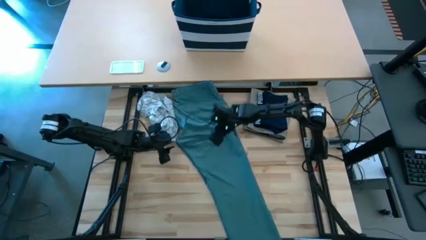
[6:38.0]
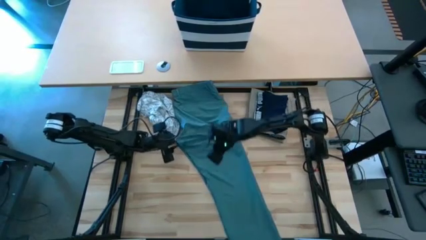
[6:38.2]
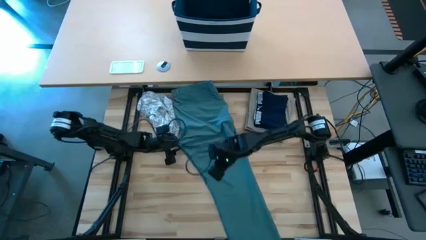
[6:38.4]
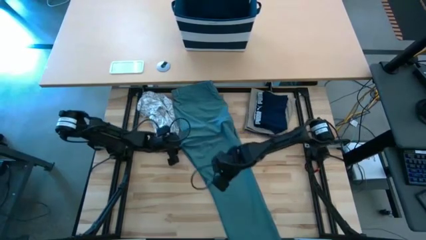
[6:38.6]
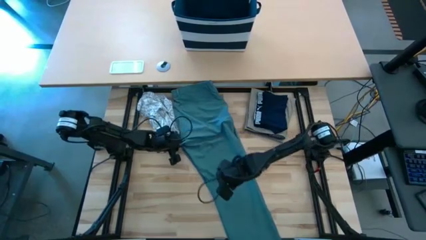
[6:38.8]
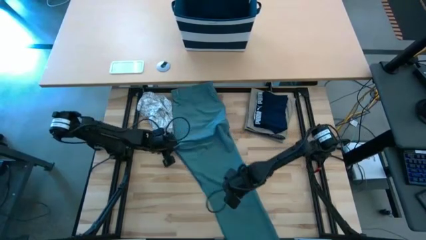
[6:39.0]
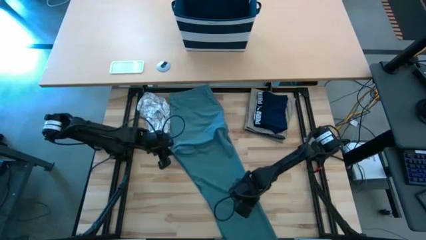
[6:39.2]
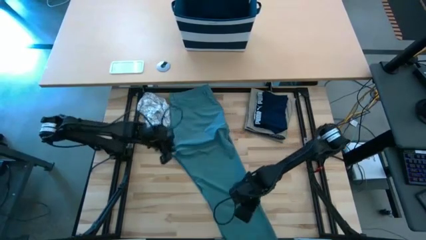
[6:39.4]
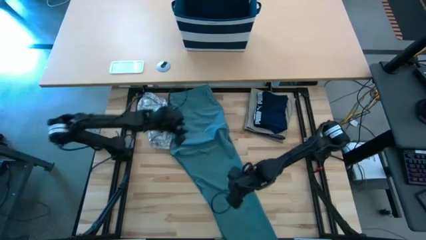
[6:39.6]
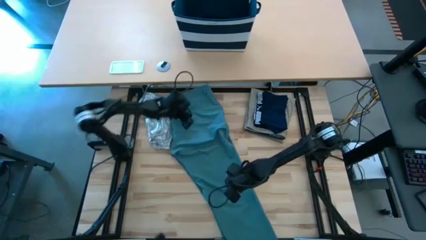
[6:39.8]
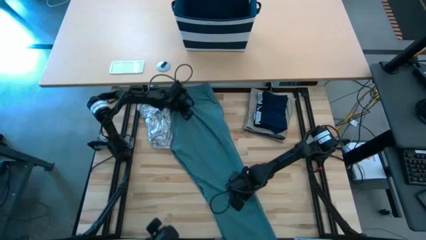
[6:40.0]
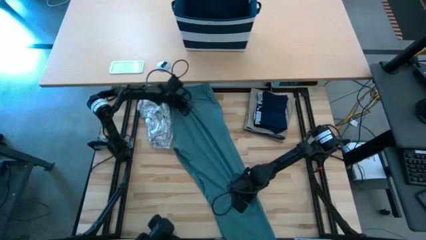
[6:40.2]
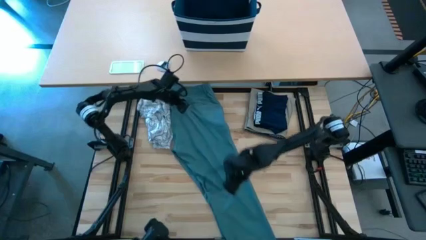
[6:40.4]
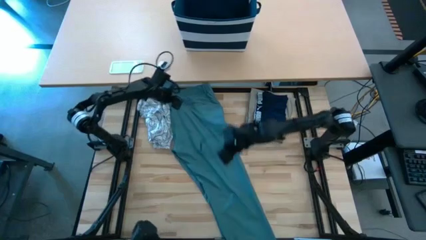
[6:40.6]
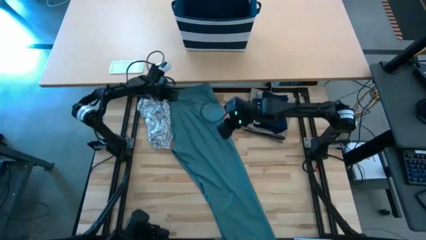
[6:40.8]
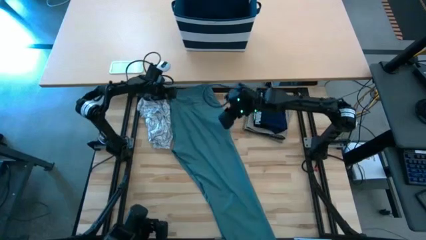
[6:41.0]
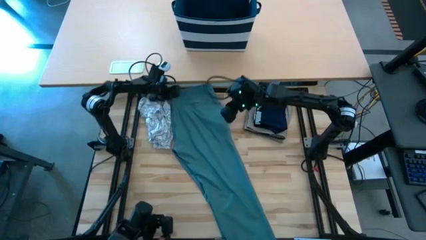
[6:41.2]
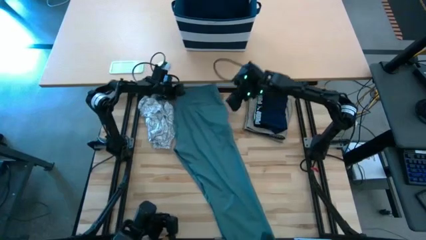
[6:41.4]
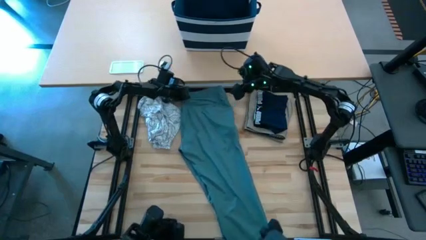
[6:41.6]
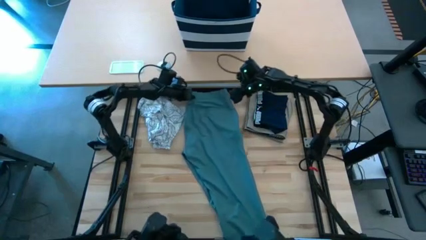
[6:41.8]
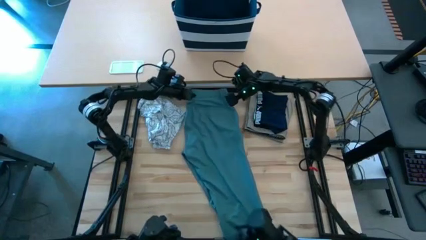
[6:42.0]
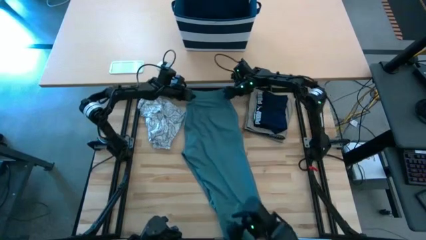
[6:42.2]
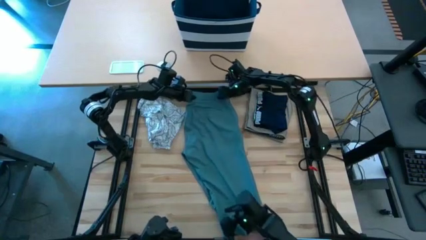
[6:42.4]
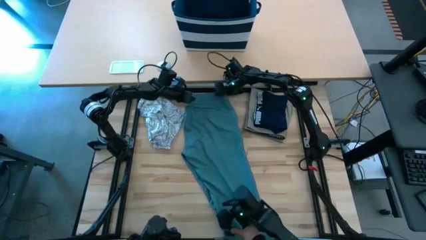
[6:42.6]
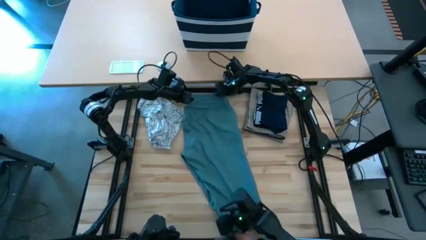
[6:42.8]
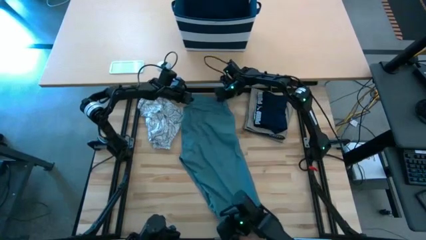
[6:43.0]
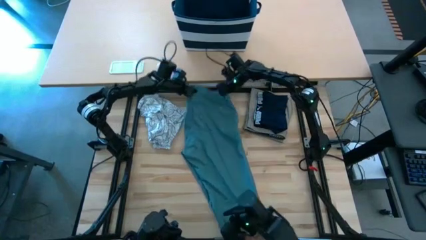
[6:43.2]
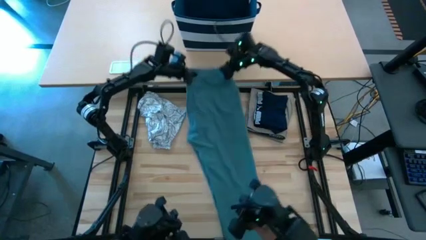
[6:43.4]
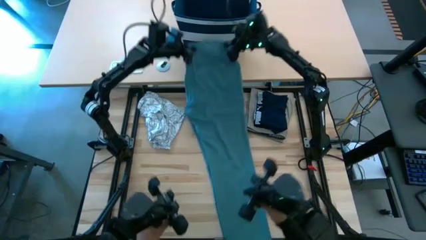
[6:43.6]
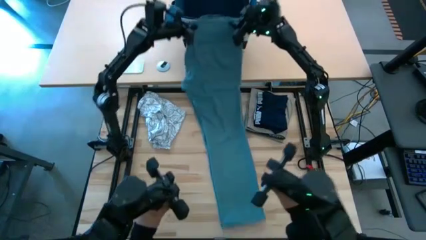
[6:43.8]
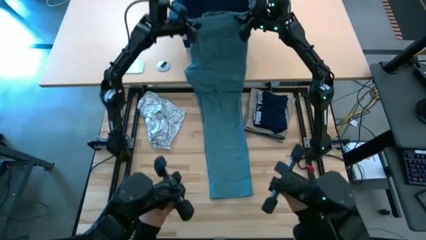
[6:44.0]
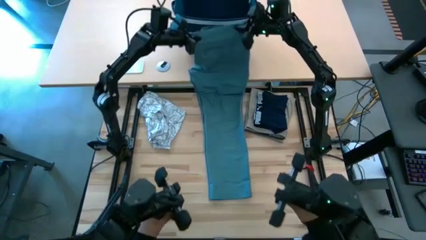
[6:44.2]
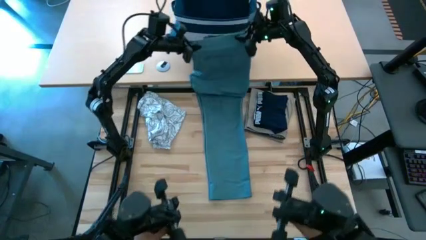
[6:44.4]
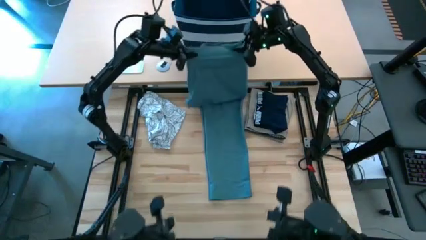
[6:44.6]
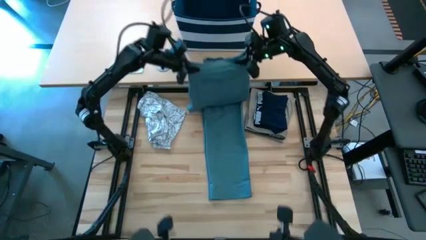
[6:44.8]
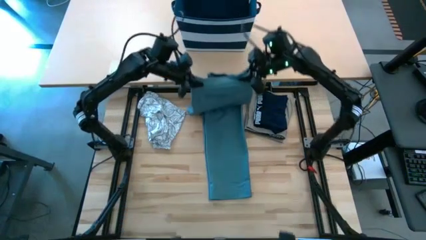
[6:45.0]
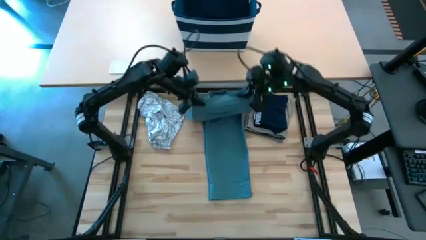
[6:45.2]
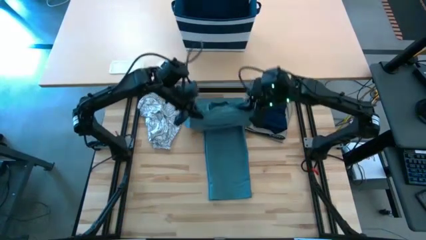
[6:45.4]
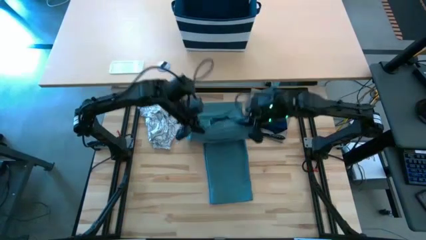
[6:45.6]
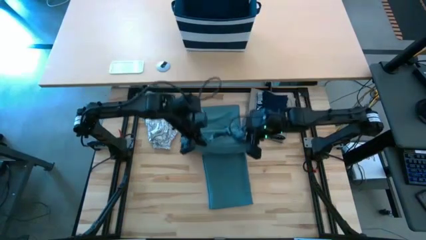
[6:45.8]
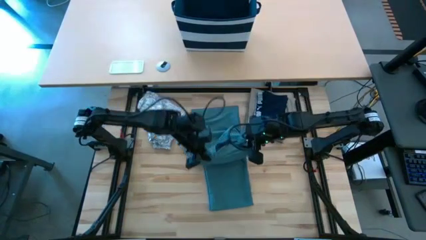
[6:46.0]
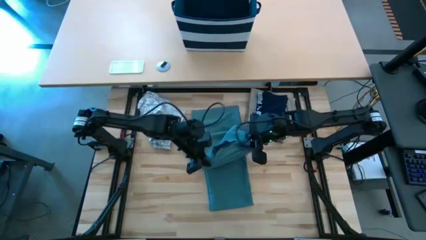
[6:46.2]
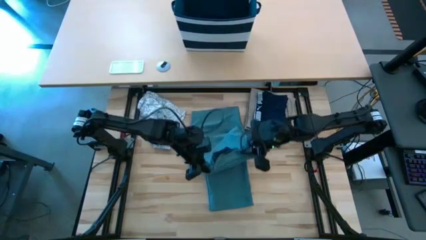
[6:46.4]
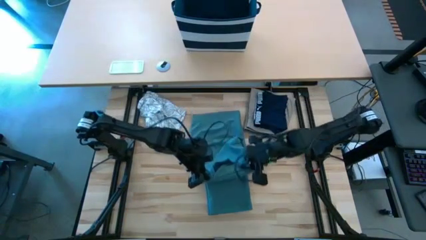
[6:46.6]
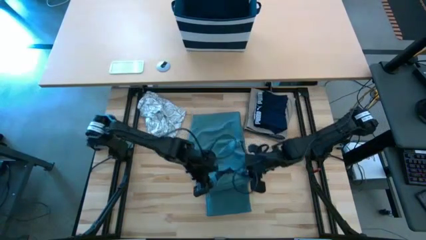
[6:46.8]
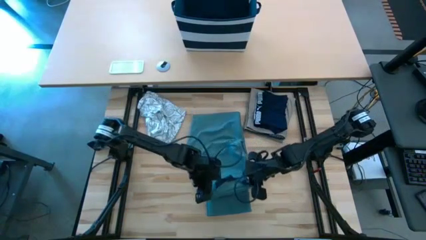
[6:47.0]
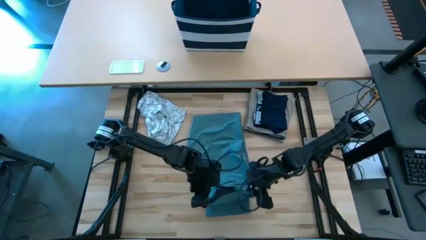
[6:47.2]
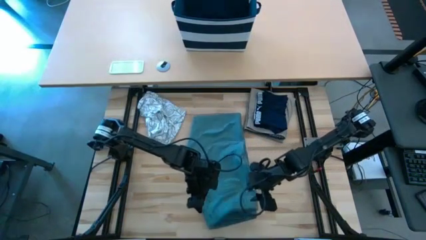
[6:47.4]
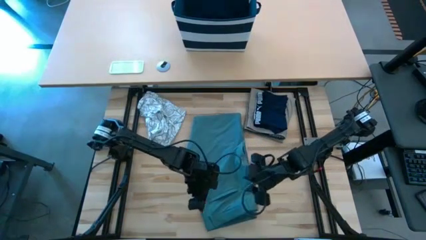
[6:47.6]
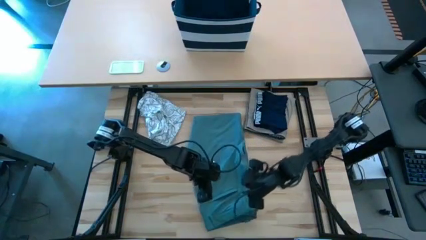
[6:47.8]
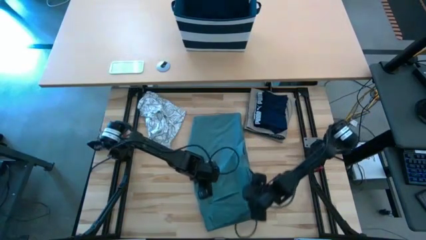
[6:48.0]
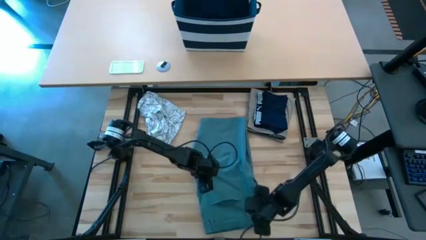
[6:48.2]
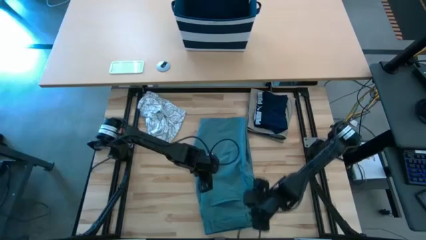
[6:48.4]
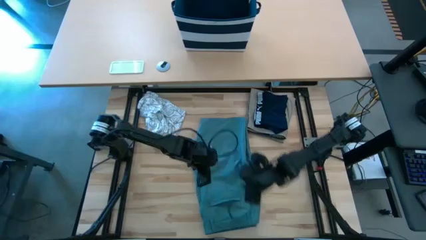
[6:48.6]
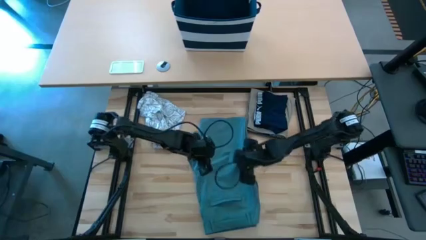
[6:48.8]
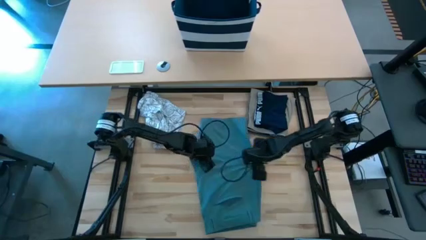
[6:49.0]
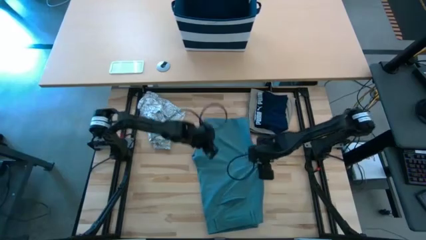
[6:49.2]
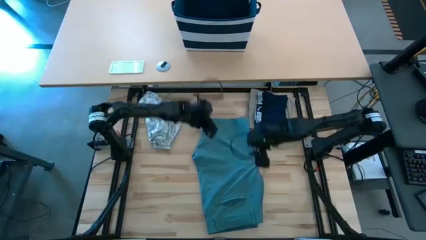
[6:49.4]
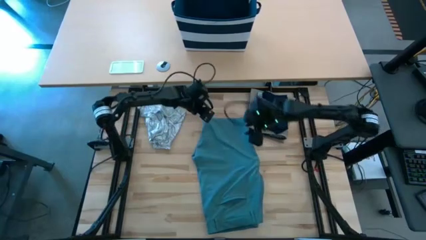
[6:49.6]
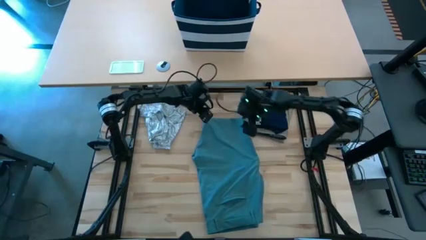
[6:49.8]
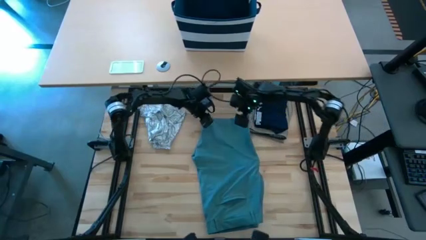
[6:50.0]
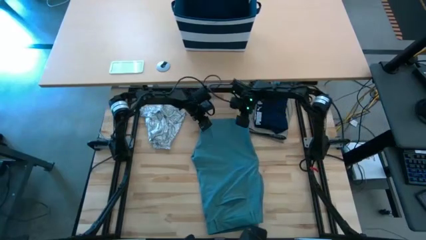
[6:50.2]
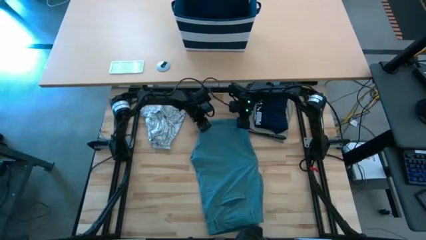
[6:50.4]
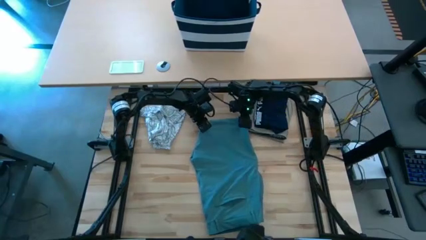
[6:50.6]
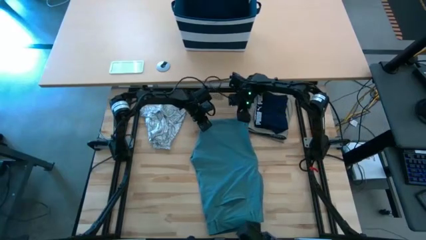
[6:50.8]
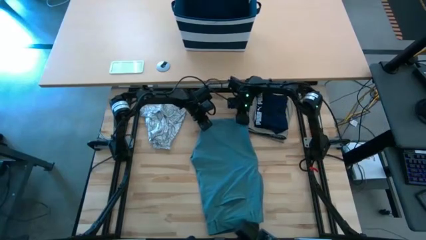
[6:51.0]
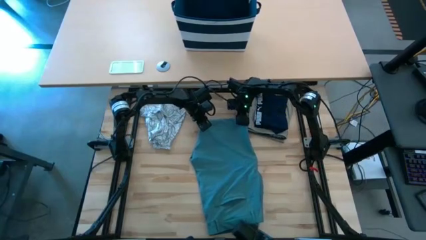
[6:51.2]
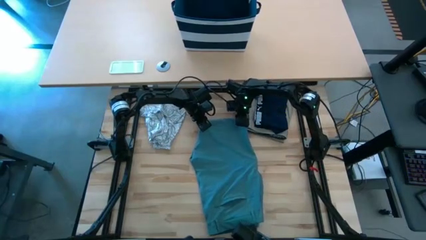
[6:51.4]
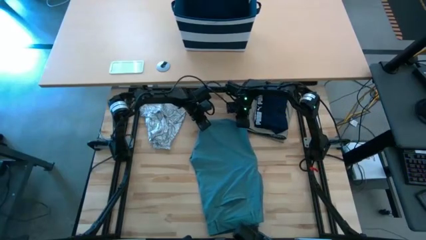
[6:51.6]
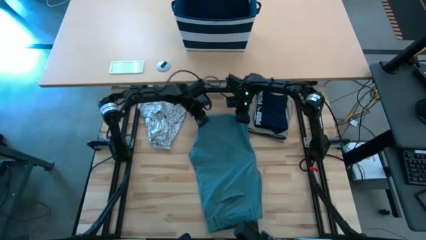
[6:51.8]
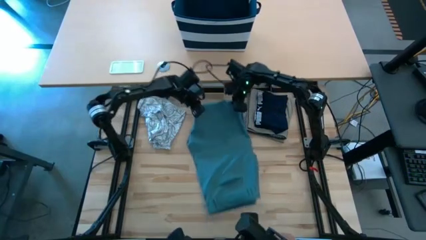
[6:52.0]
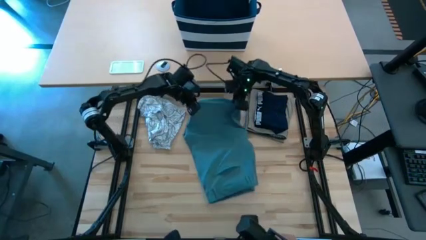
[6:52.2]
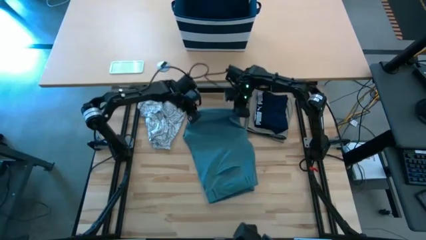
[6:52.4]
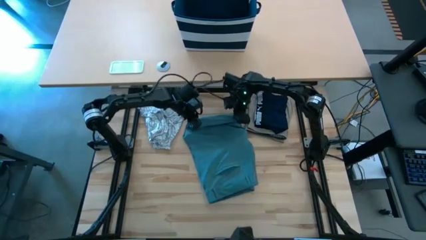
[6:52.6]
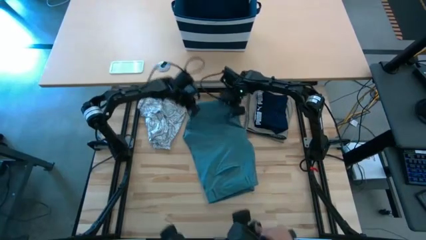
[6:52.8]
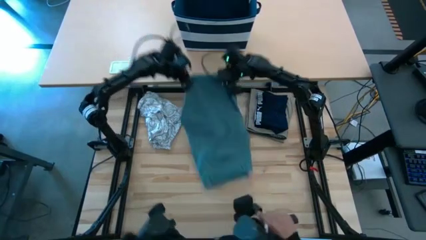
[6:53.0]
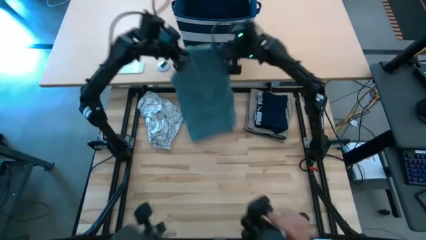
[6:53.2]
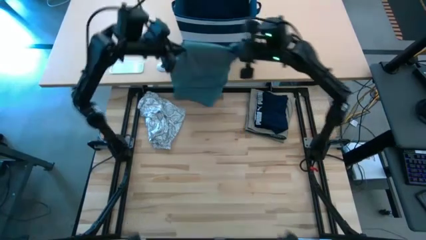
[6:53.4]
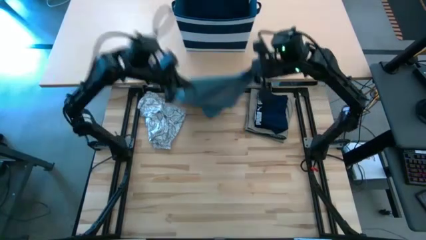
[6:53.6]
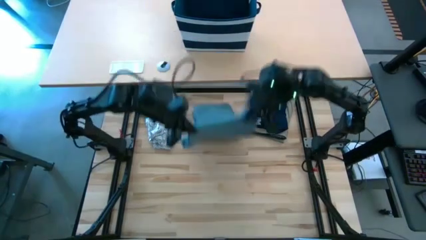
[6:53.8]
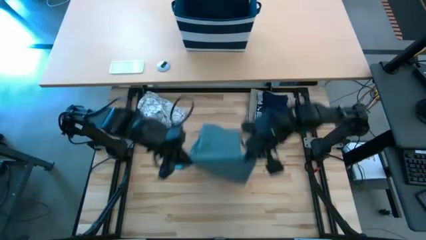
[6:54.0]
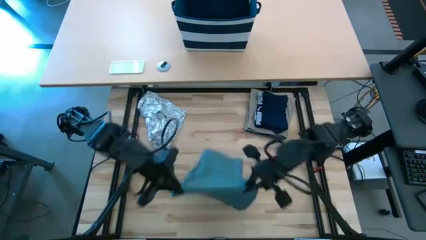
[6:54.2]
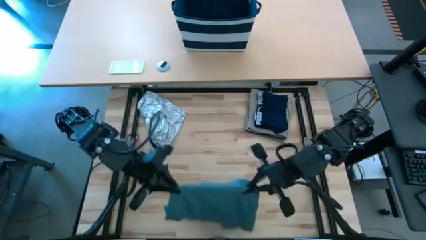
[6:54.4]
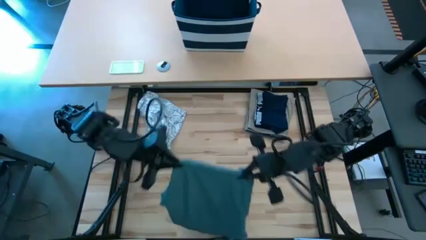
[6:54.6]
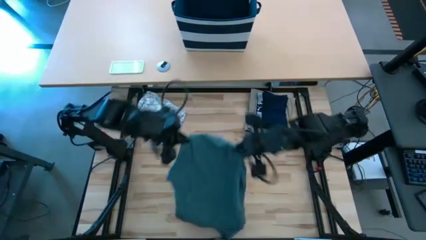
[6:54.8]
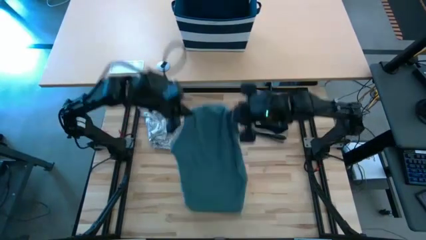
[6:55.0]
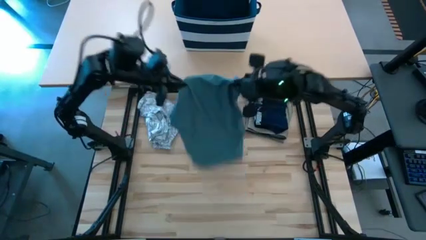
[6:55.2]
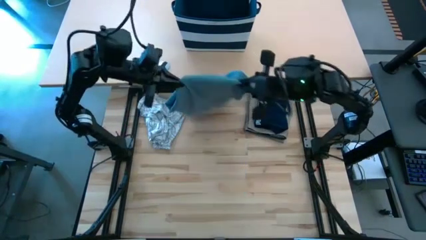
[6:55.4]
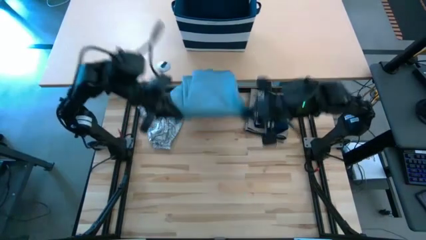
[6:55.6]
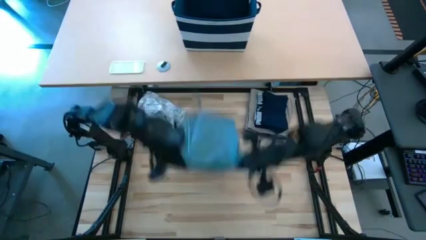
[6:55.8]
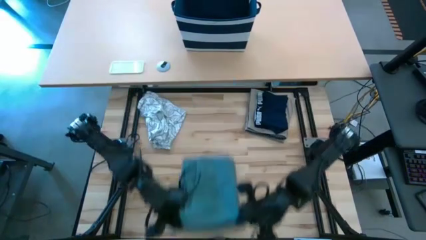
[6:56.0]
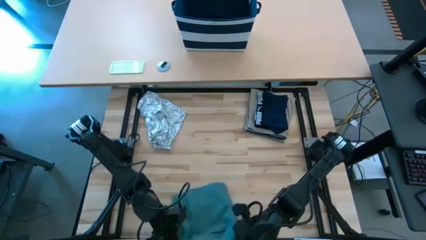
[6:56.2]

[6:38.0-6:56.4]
Task: Fold Laundry from Bin
Fold the blue pants
